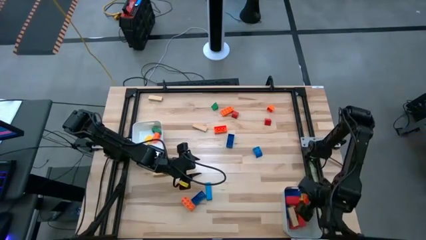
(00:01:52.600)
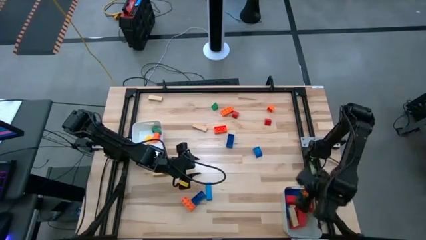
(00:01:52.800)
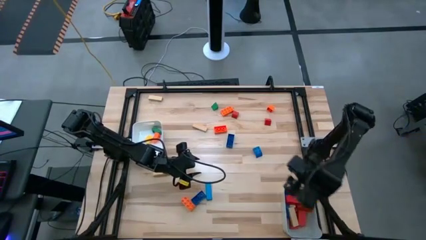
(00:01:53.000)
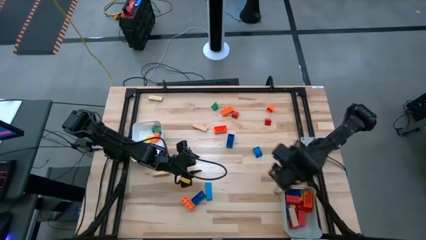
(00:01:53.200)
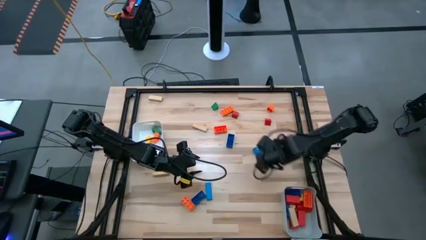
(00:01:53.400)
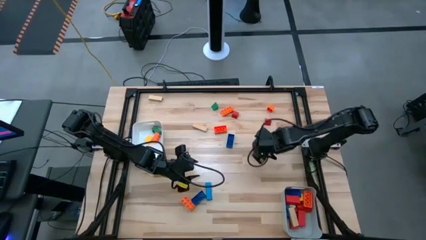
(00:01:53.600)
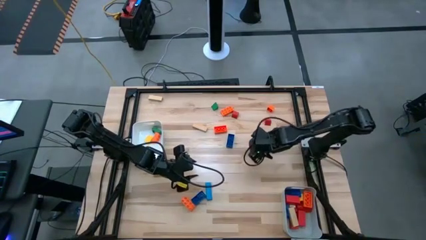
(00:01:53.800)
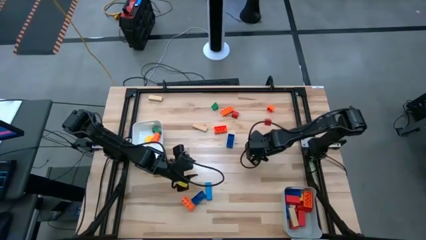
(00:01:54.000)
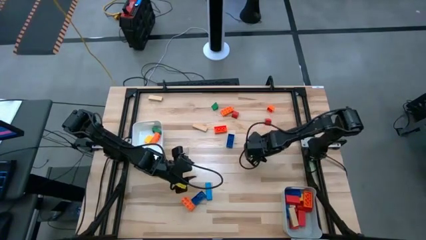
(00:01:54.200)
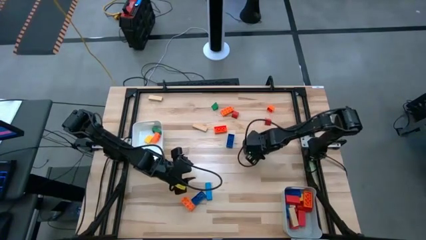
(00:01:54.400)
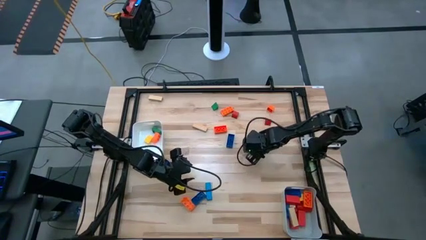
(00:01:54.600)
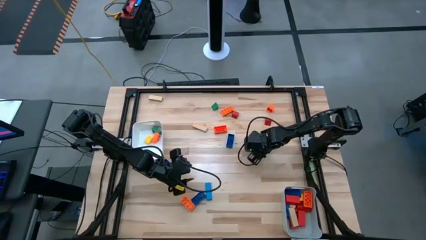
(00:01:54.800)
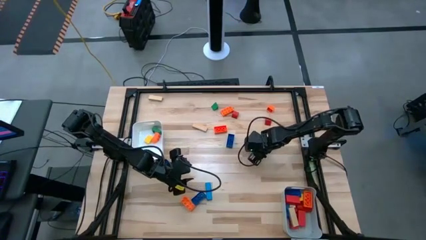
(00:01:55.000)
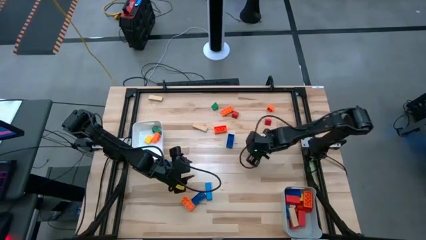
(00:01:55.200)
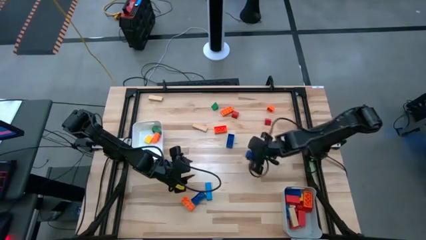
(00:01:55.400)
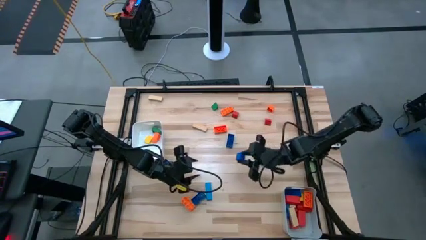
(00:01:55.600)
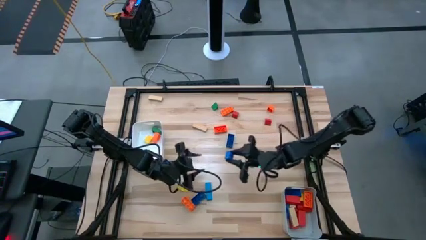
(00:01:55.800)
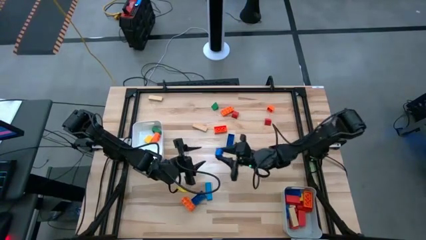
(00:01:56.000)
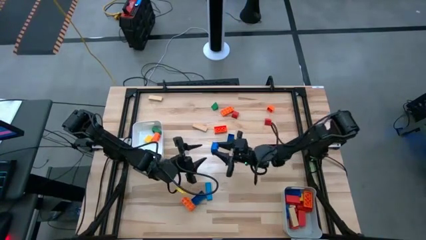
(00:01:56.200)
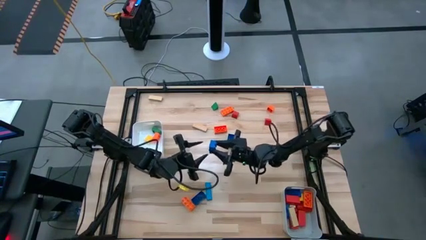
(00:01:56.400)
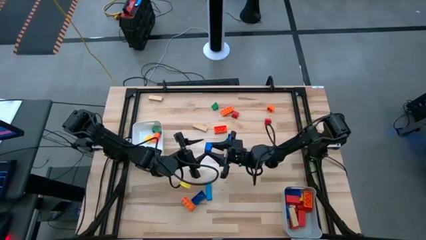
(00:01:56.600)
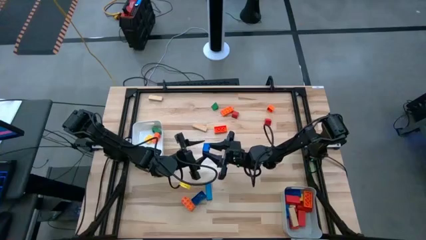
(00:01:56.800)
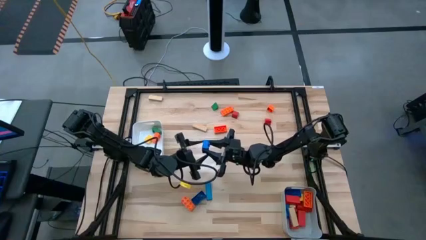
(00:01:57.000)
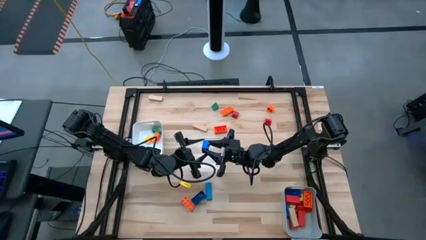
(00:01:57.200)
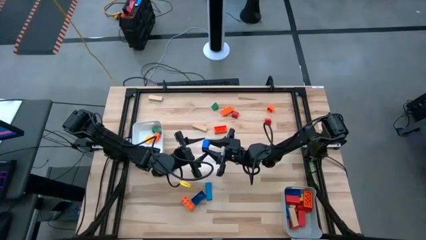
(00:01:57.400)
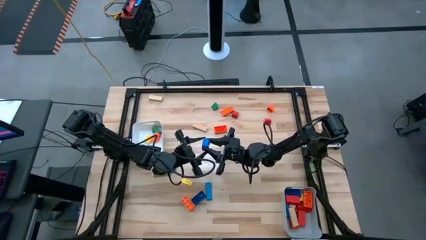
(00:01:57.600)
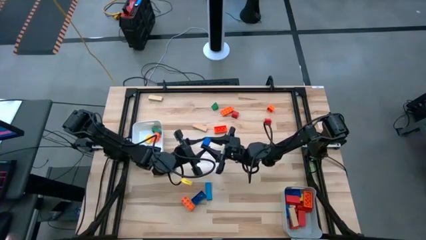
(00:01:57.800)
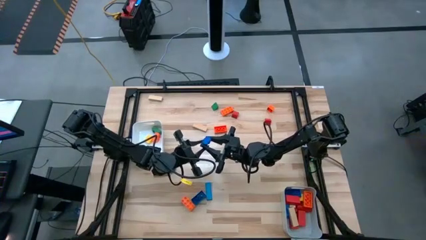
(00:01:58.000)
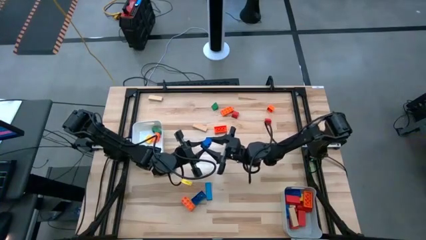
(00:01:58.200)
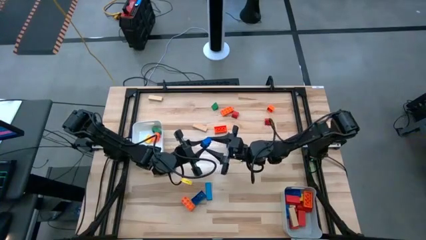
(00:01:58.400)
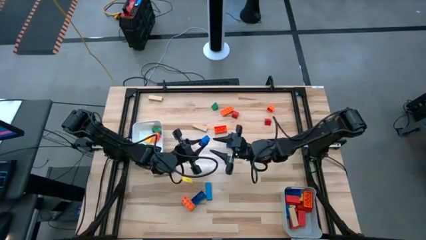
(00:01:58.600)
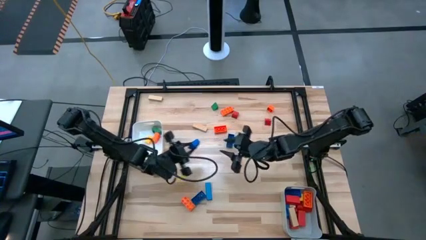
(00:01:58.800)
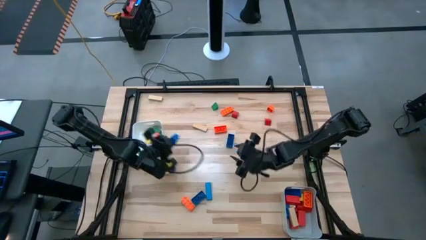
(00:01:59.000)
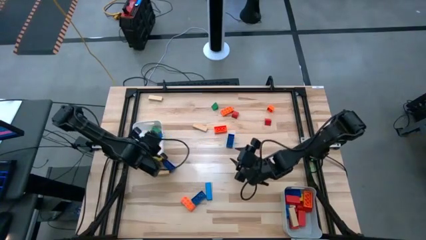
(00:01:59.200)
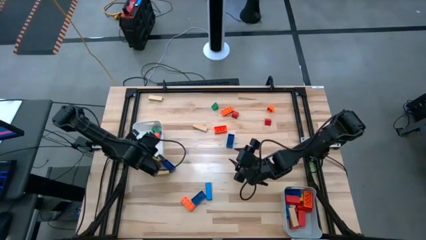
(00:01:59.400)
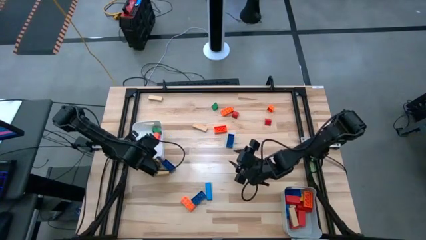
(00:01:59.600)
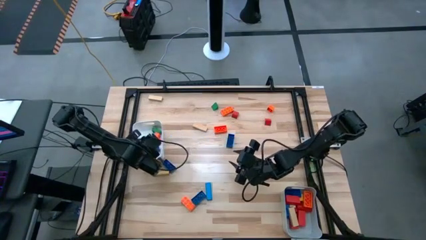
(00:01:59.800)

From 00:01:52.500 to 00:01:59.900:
Task: Sort blocks by size
Put the blue small game piece into the white bin

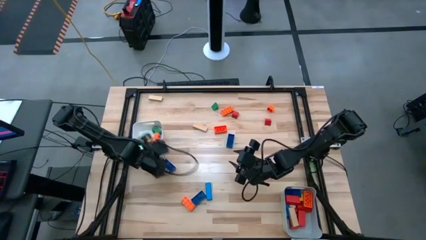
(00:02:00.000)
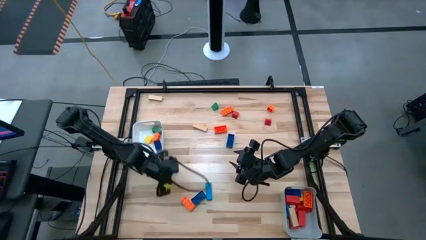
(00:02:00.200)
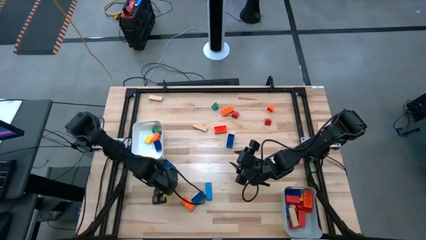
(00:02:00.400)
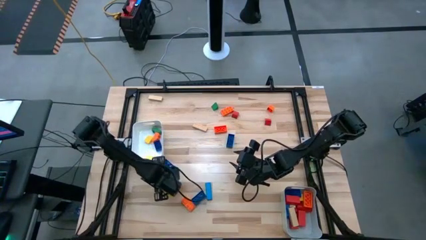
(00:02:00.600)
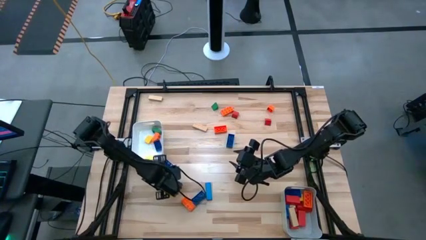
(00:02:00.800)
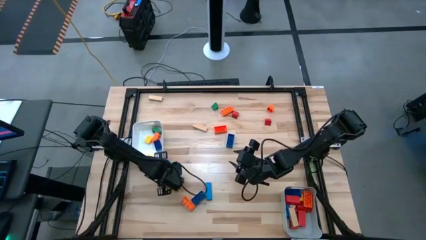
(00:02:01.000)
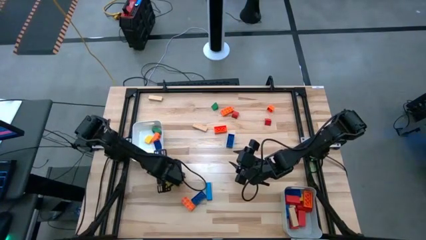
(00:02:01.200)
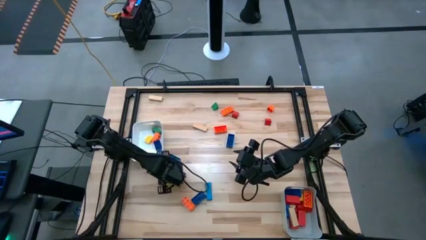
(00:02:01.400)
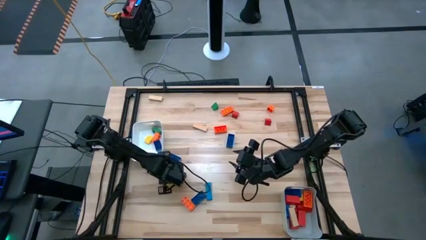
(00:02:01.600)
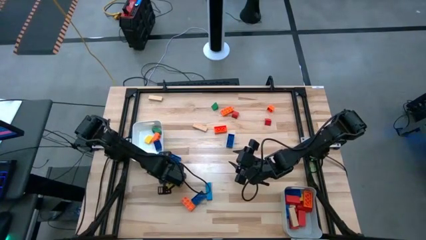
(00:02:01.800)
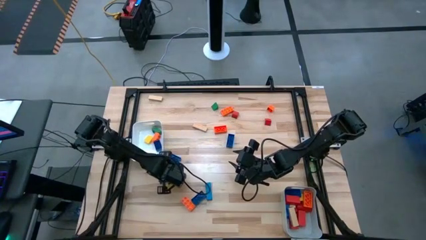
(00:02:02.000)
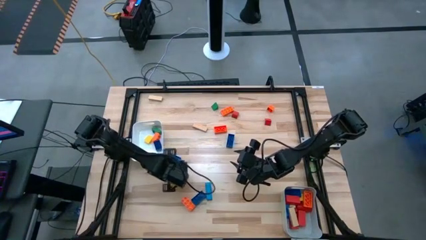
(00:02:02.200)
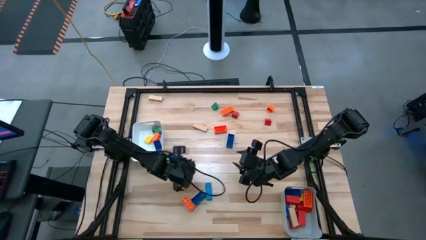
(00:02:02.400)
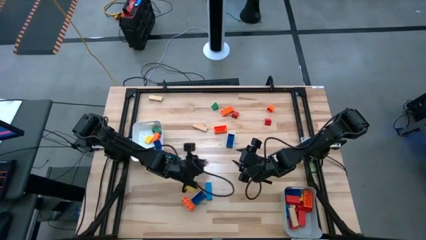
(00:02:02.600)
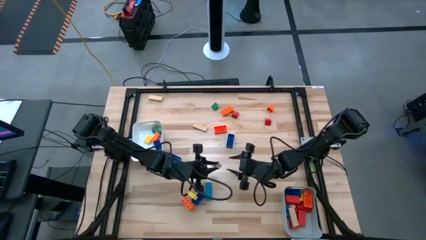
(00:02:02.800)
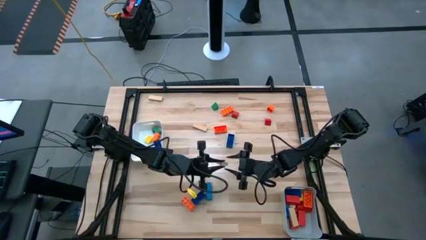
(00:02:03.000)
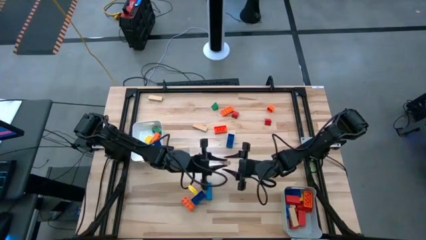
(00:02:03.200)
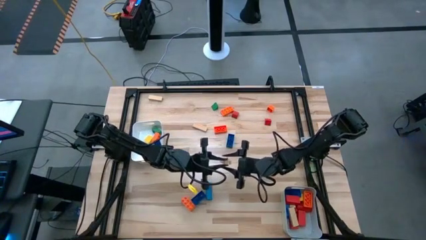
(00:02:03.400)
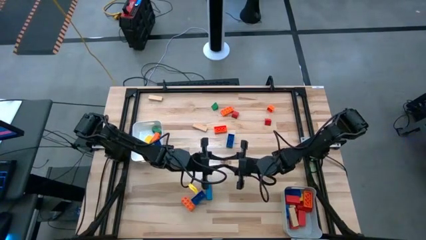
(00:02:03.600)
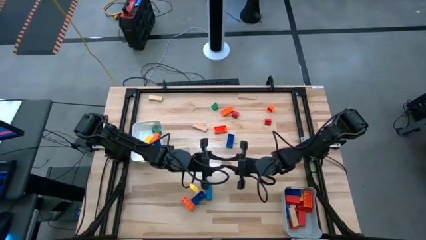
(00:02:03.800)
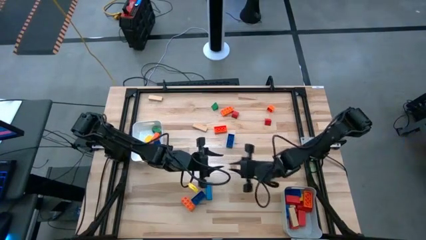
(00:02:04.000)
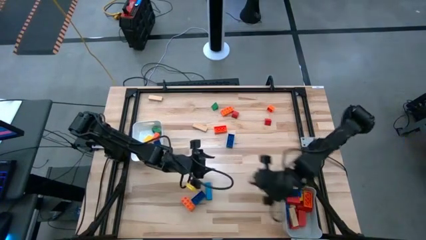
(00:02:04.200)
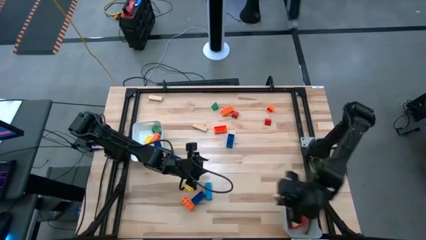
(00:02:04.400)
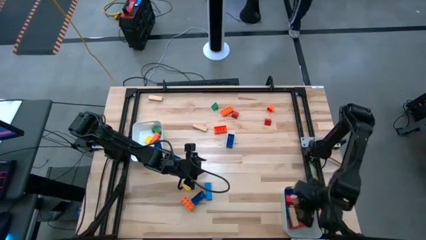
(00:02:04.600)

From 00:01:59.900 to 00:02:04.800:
Put the brown large block into the gray bin

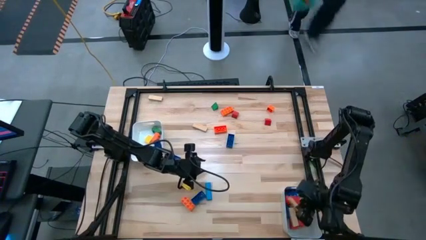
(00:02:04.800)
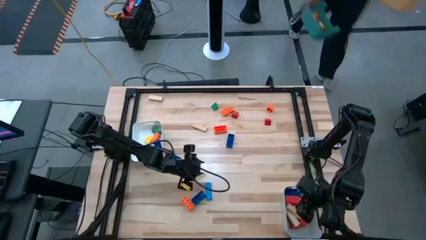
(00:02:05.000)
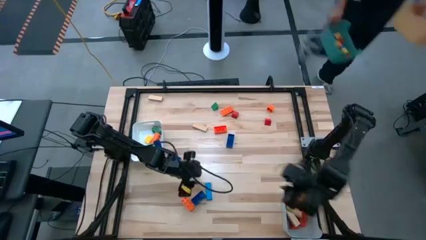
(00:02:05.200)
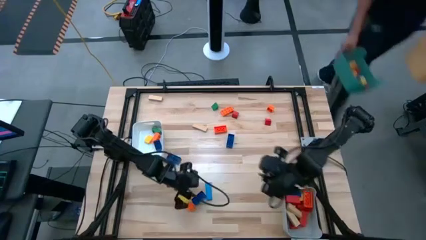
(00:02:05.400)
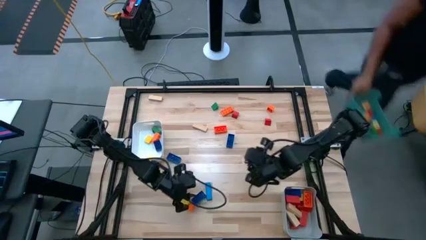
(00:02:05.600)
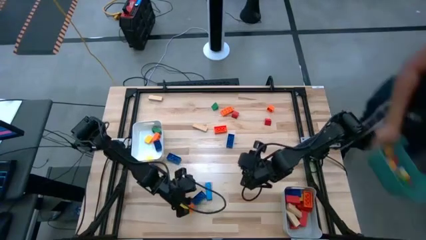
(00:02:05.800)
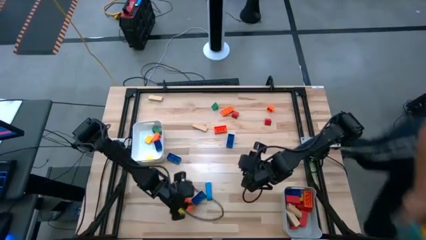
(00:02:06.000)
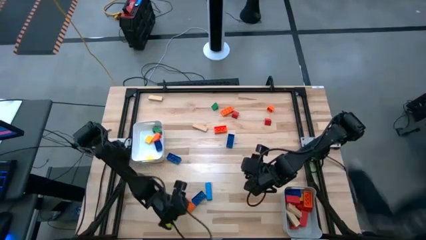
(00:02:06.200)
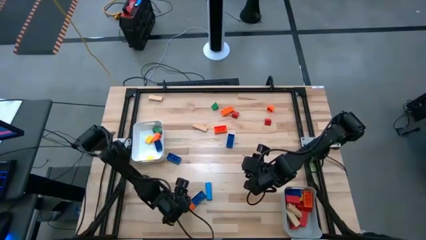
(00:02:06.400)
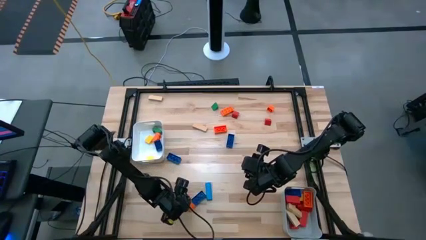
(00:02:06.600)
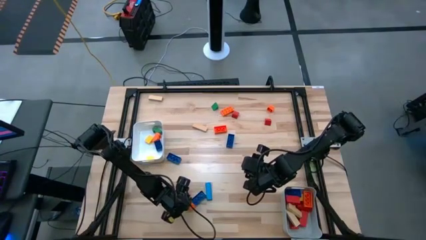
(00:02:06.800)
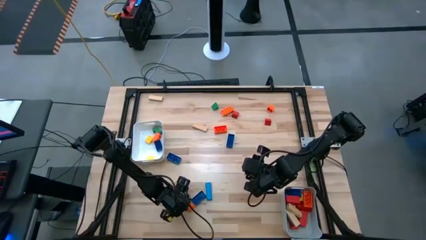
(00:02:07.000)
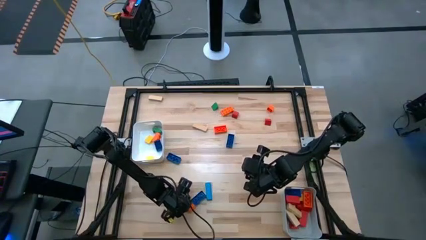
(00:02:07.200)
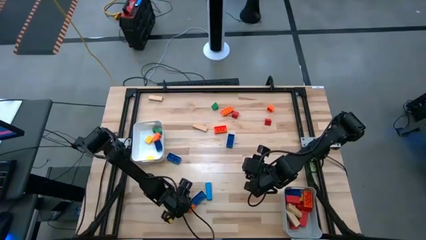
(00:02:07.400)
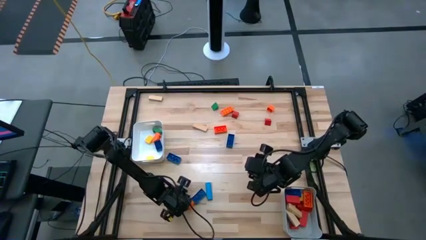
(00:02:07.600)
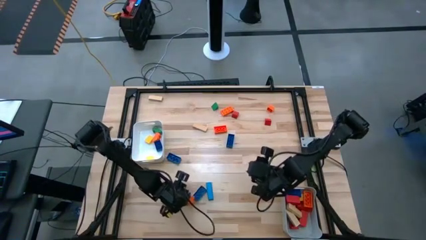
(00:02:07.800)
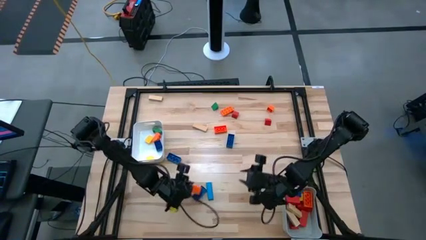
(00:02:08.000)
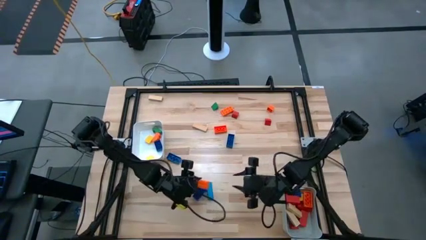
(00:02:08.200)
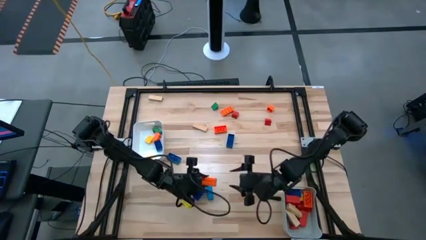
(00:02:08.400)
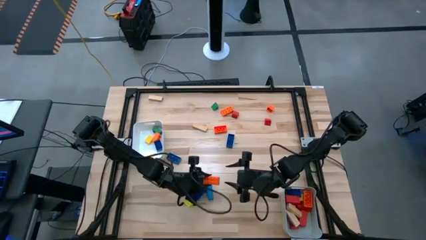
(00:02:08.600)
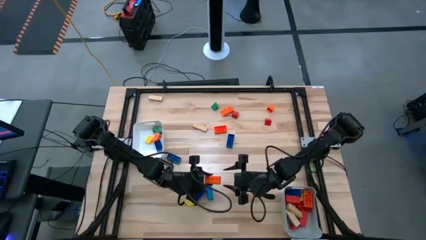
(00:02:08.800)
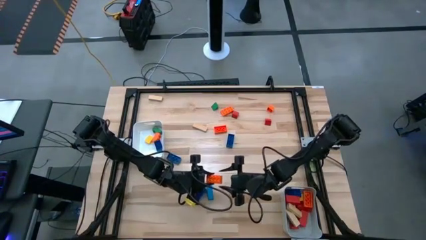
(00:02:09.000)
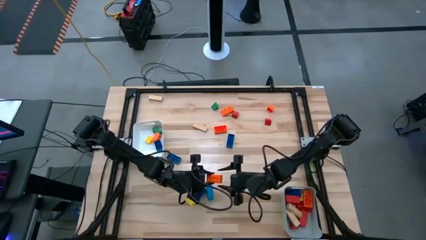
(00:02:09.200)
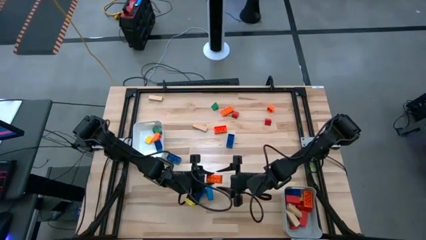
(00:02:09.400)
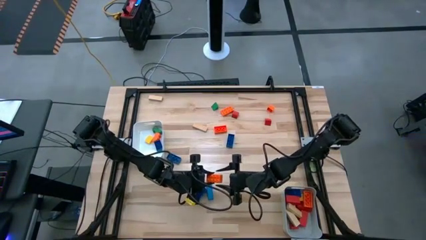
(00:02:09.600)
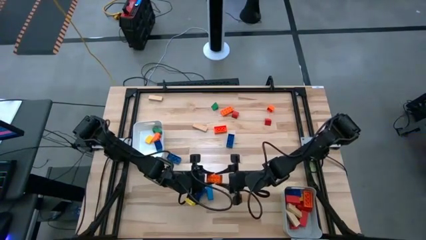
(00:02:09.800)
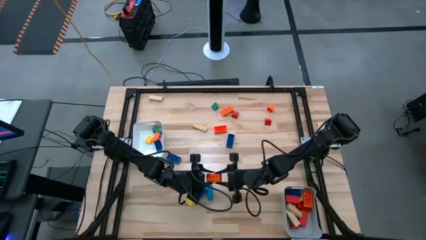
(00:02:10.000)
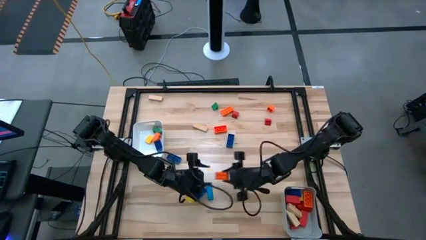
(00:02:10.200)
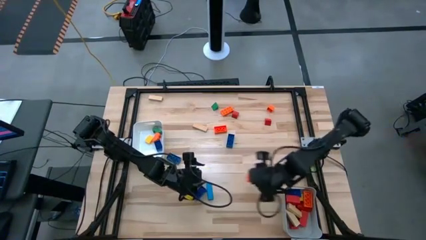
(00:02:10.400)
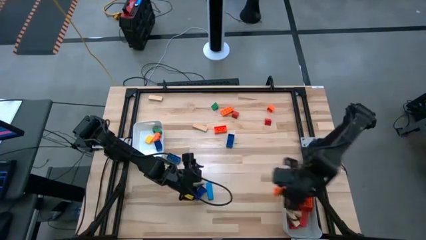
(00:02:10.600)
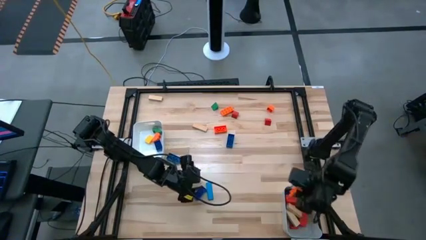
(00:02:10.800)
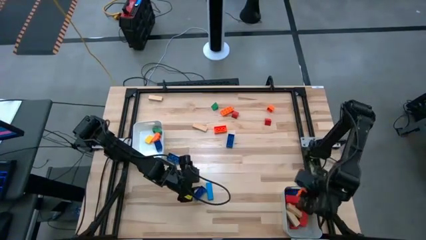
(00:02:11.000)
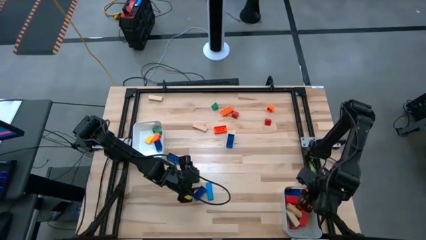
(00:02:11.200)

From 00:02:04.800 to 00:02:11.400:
Put the orange large game piece into the gray bin
